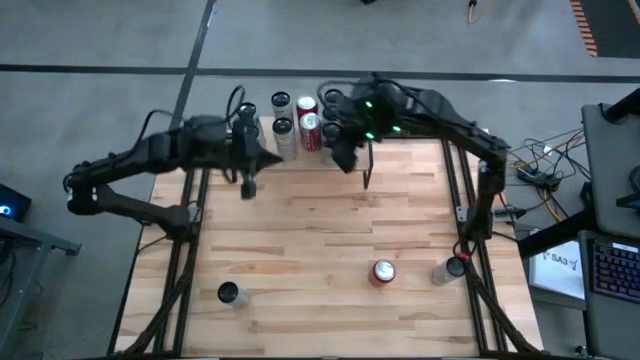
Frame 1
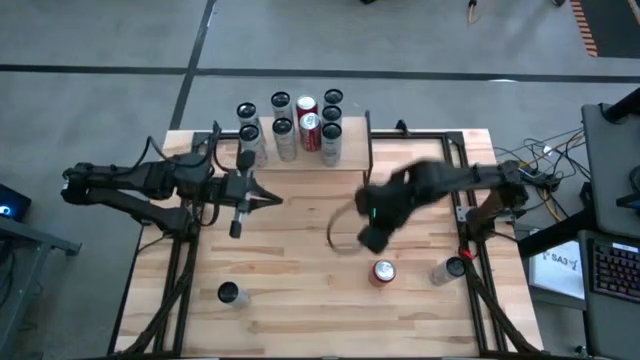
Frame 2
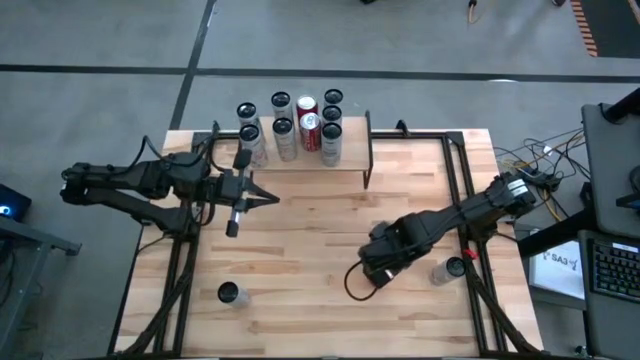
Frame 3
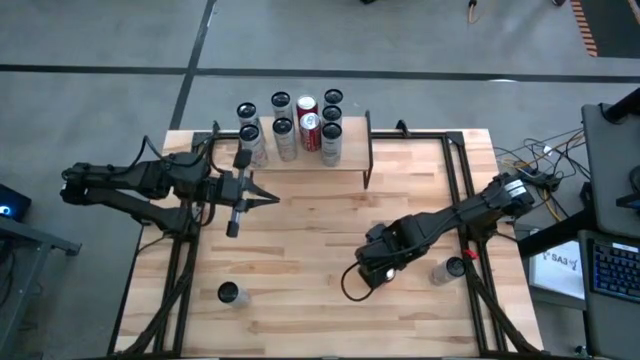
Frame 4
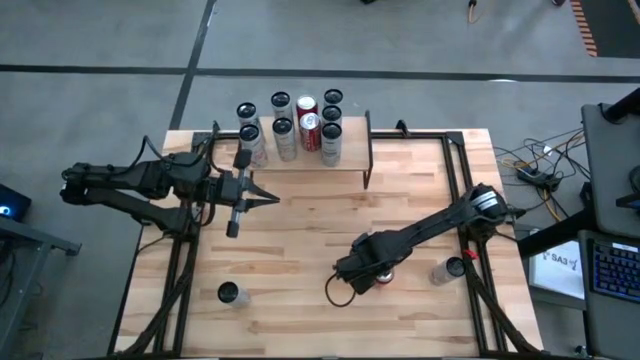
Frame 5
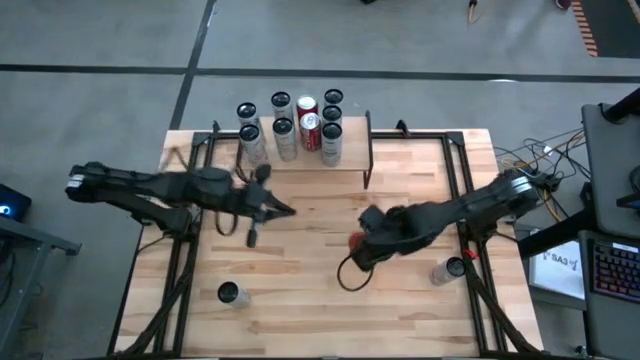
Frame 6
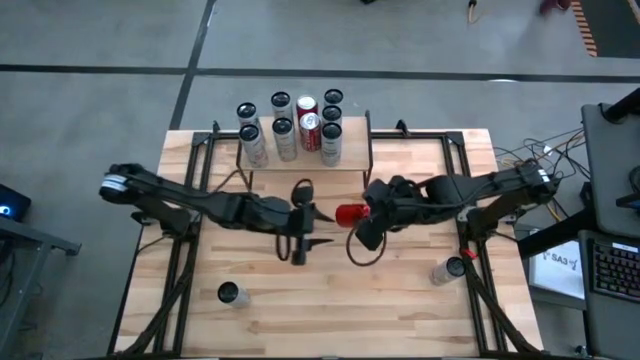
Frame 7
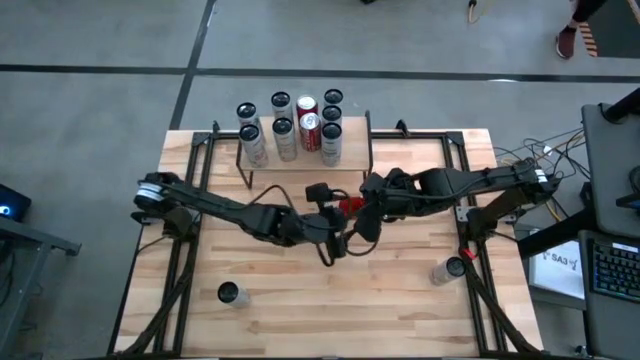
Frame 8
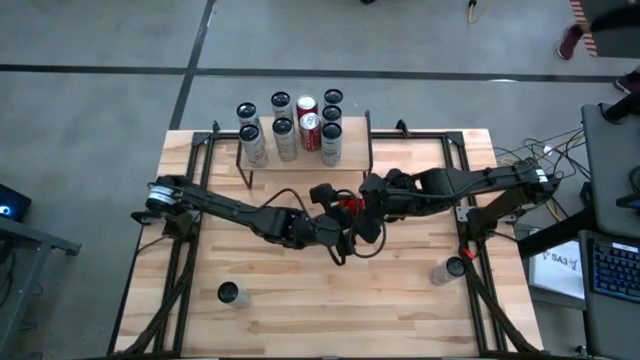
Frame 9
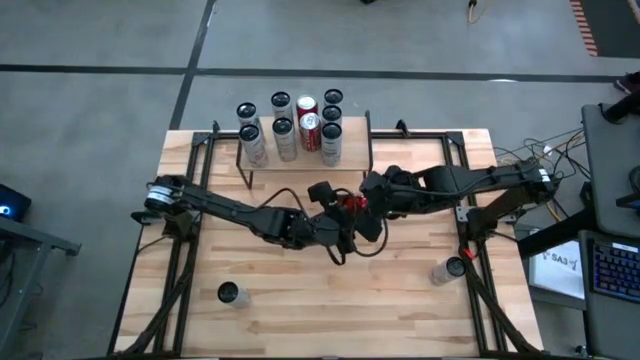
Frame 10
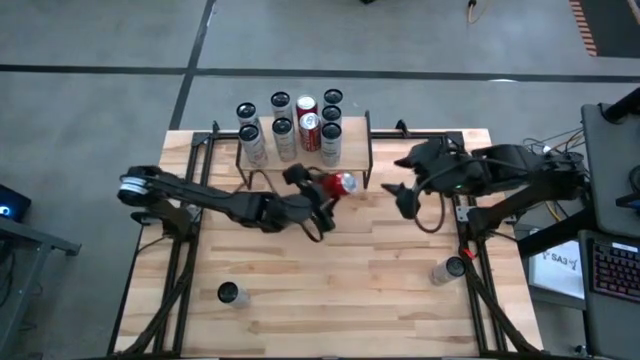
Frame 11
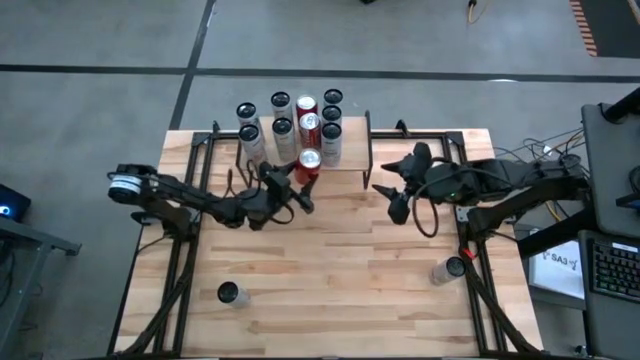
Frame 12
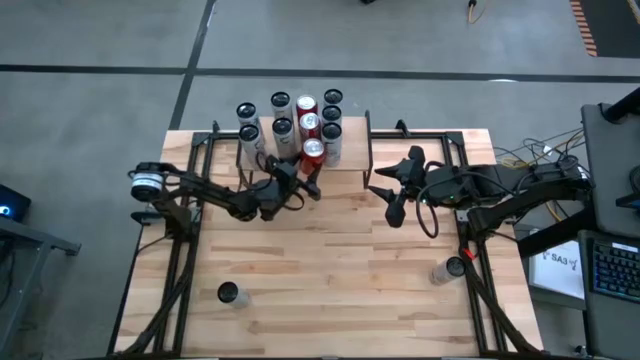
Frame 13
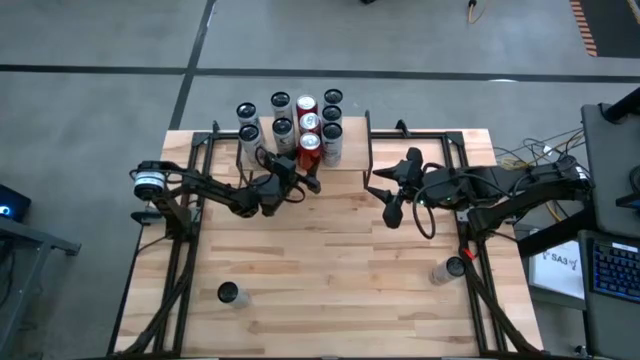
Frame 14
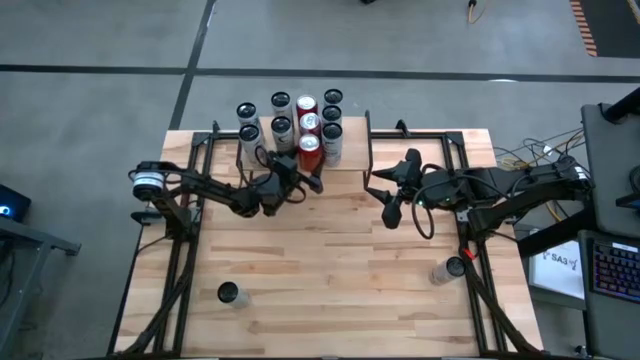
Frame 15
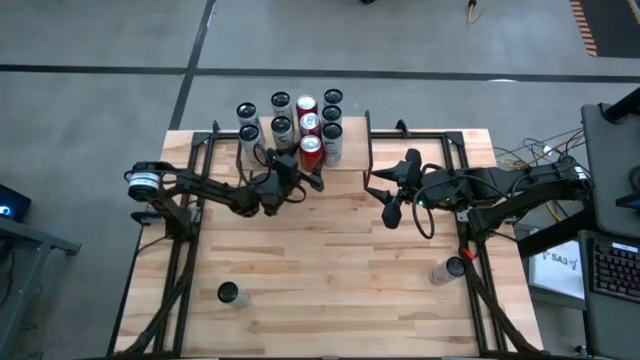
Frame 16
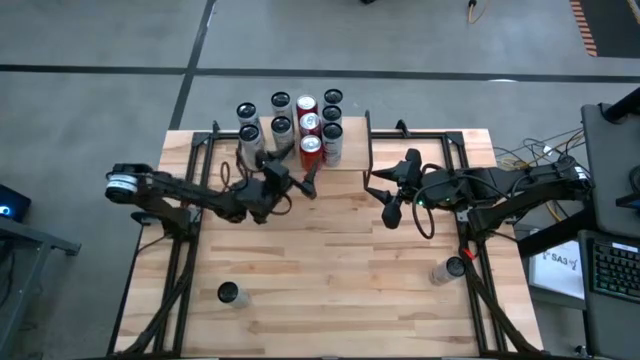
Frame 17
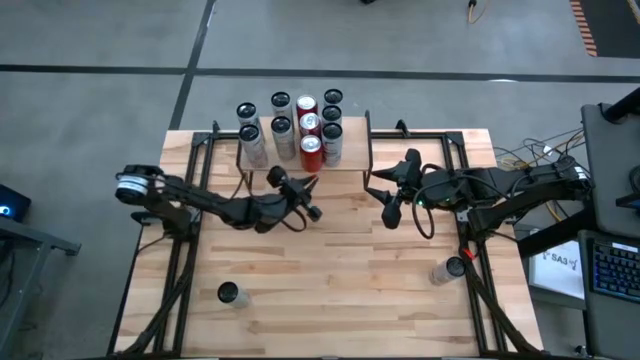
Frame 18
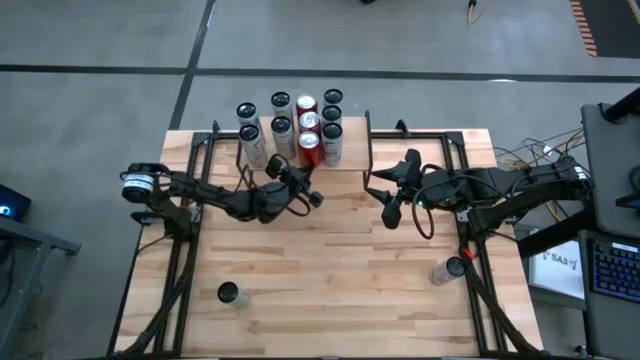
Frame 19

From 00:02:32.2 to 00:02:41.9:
Task: Place canned beverage on shelf
Put the red soda can aligned with the other red soda cans on the shelf

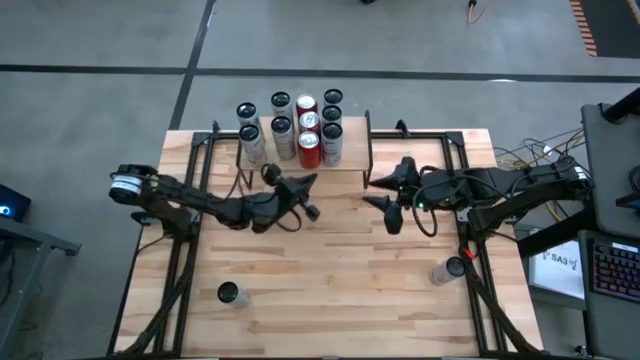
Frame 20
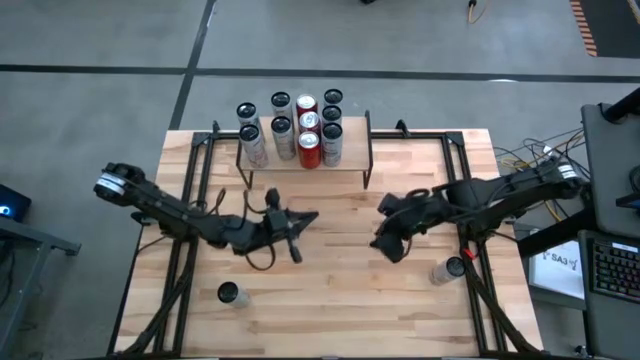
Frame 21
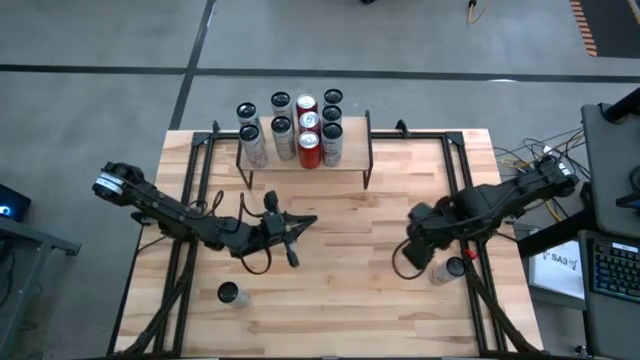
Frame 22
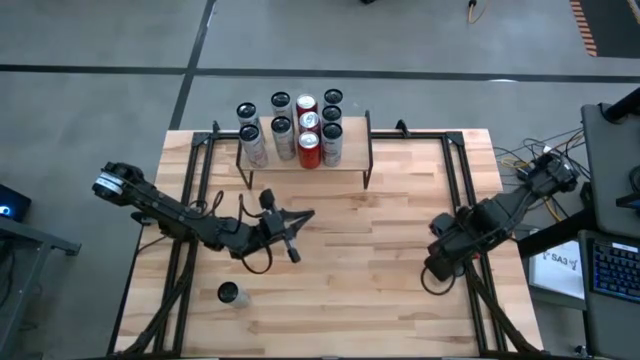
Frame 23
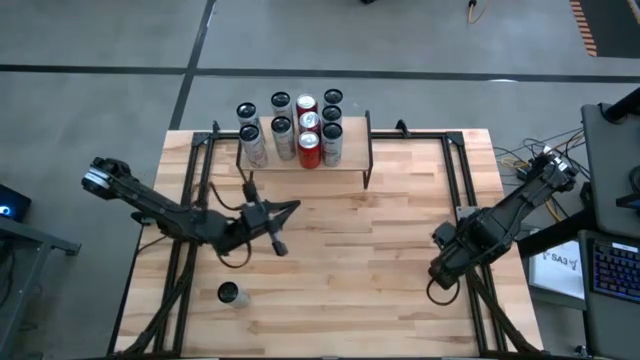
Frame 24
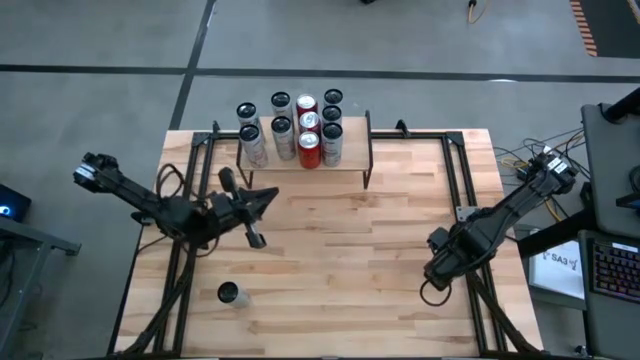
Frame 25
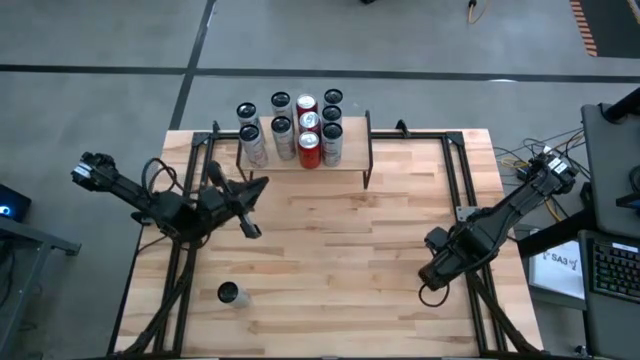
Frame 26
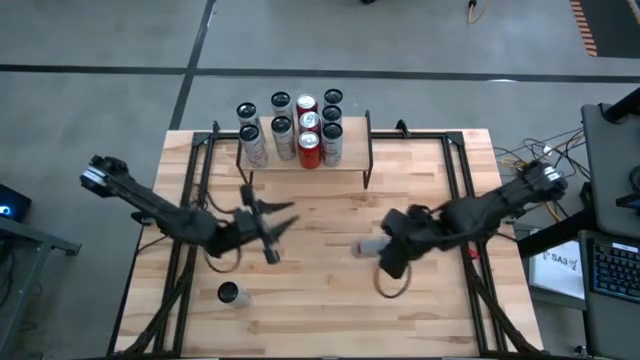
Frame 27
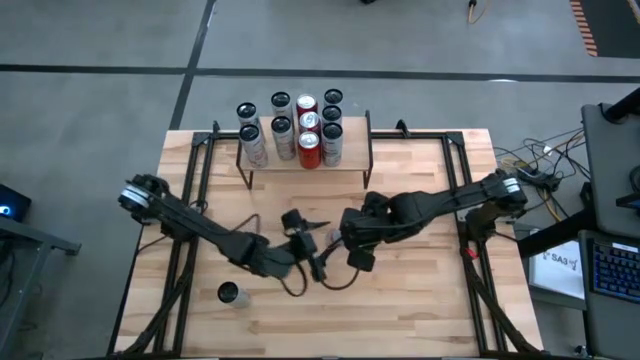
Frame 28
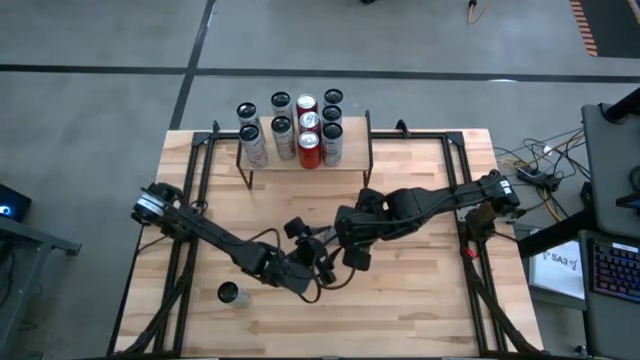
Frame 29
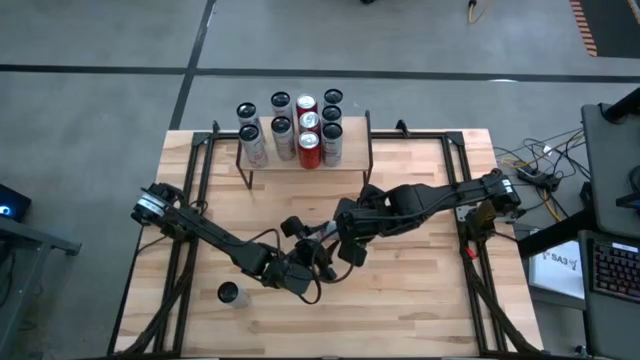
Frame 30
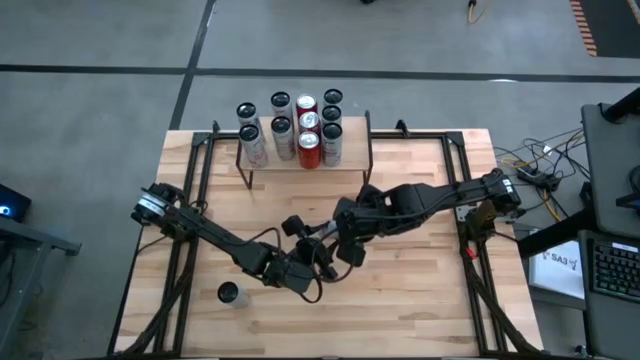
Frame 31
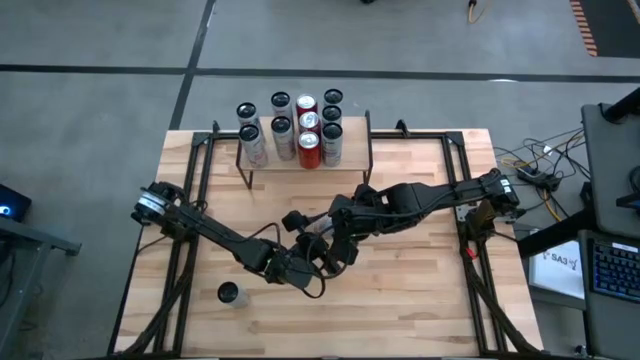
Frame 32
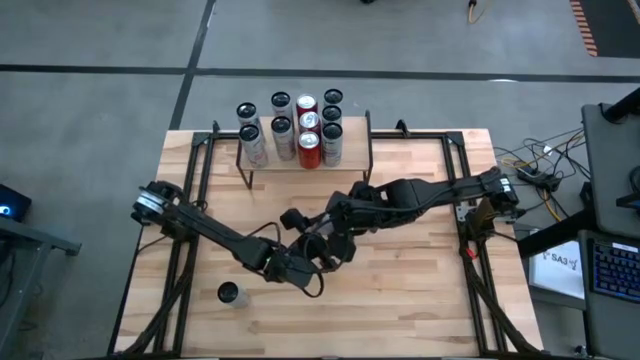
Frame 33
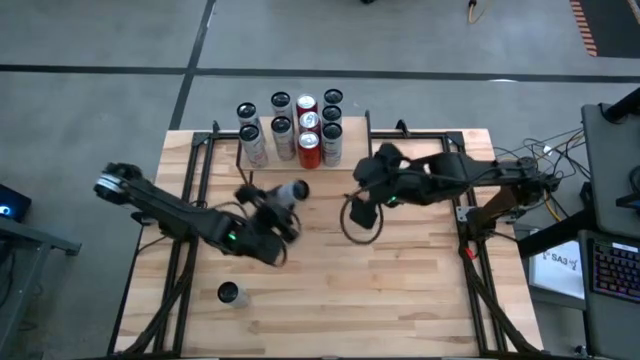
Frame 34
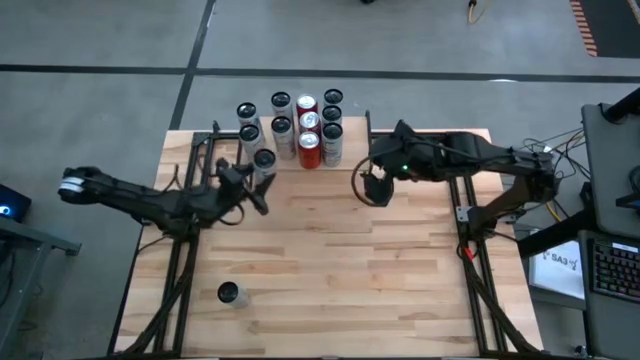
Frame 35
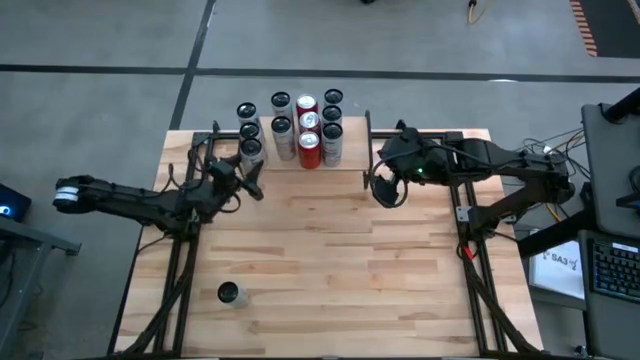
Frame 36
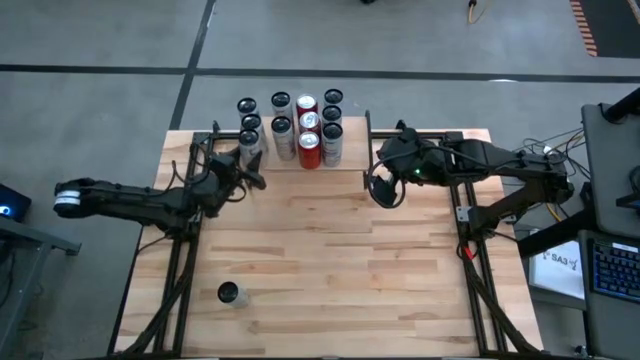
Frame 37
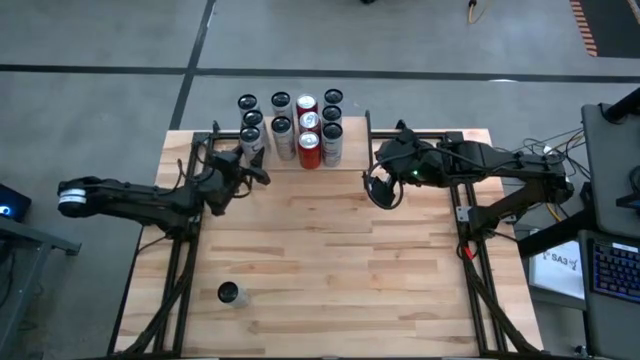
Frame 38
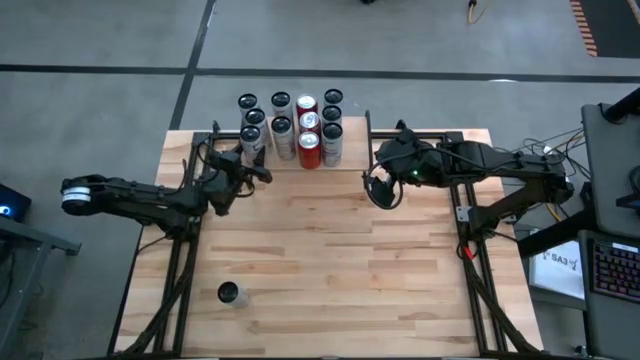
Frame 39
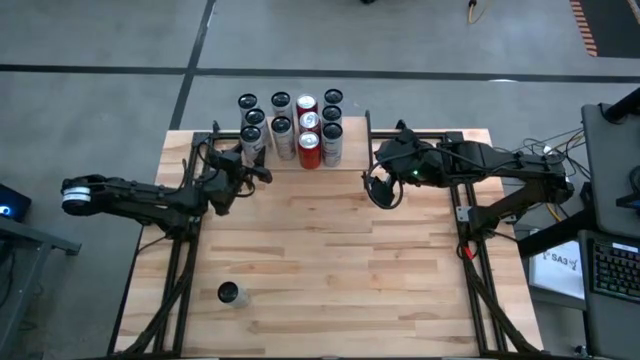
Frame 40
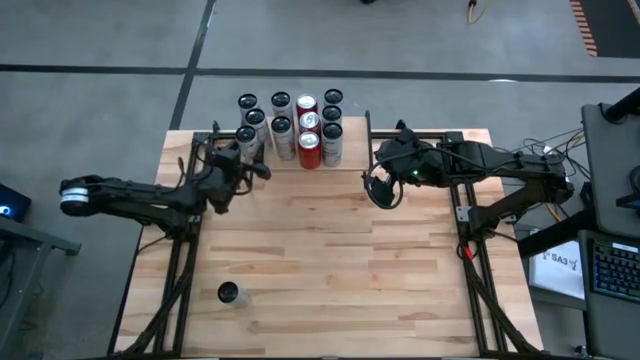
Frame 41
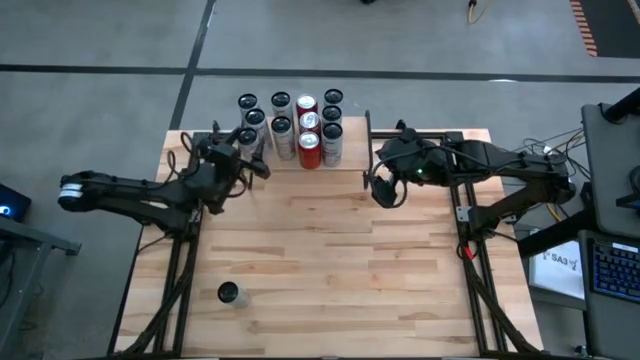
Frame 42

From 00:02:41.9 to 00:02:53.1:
Put the white soda can aligned with the other white soda cans on the shelf

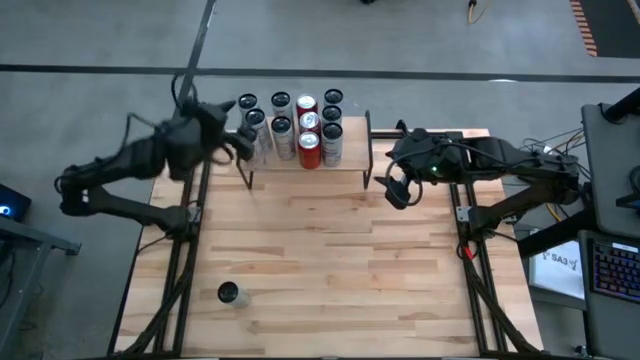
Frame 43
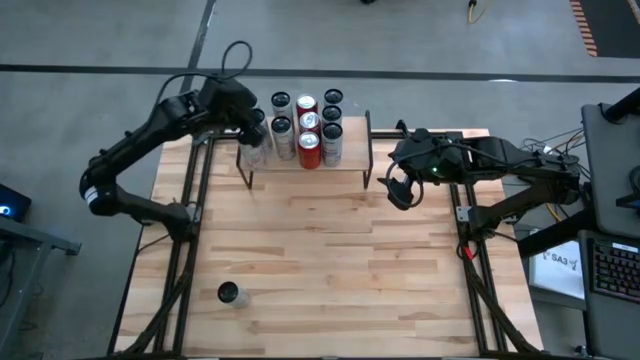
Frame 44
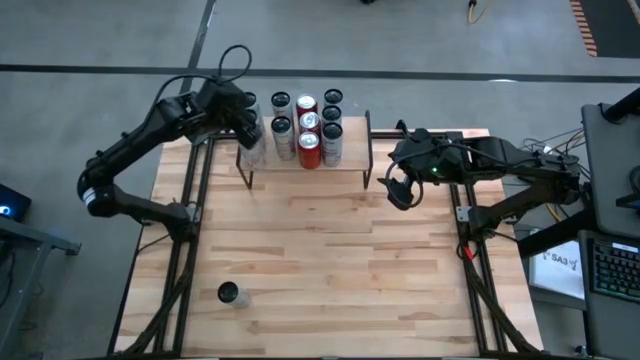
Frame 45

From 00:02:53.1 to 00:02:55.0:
Adjust the white soda can
